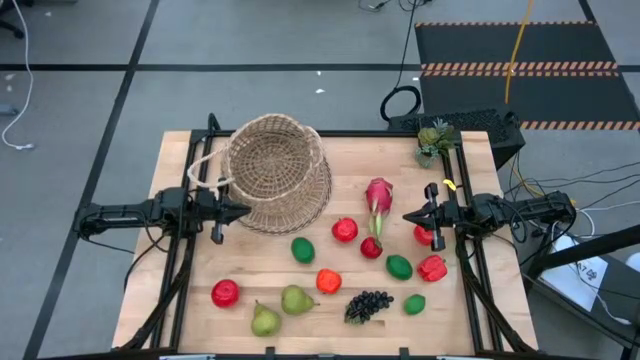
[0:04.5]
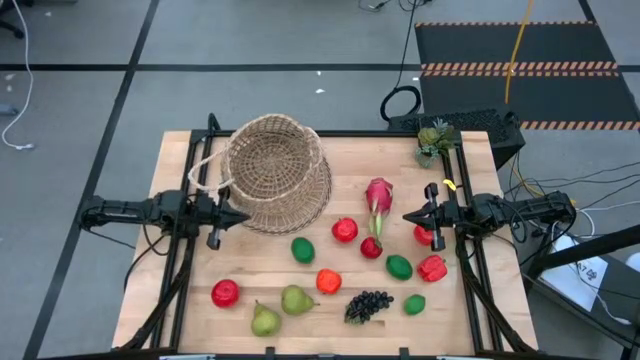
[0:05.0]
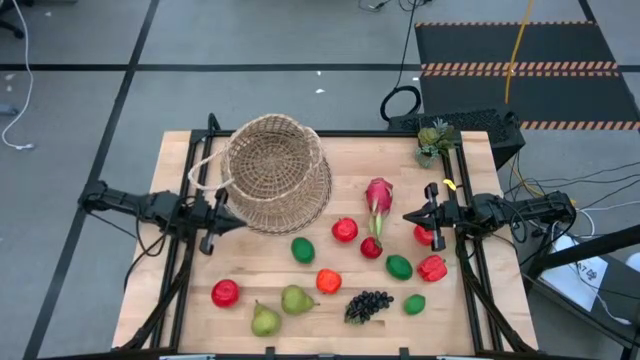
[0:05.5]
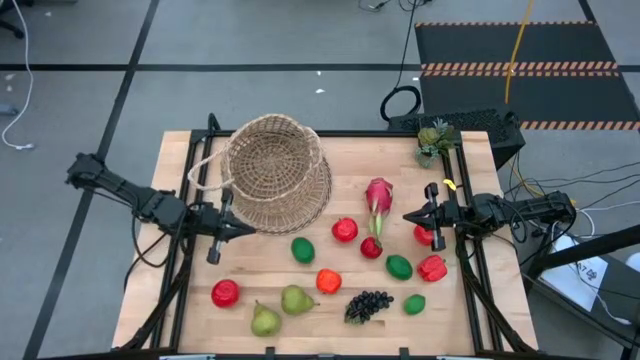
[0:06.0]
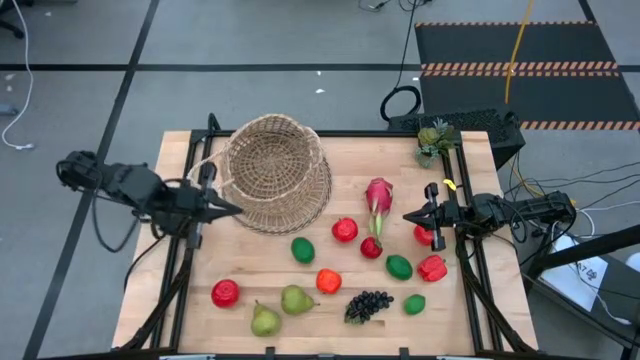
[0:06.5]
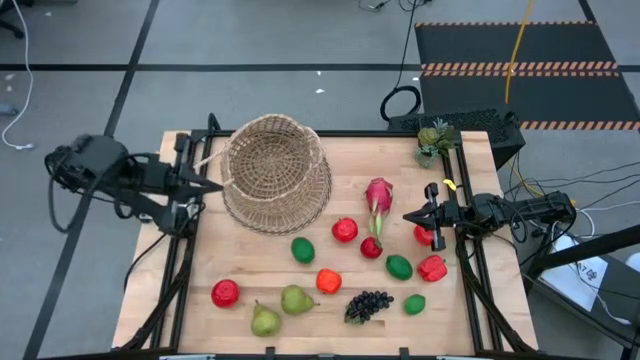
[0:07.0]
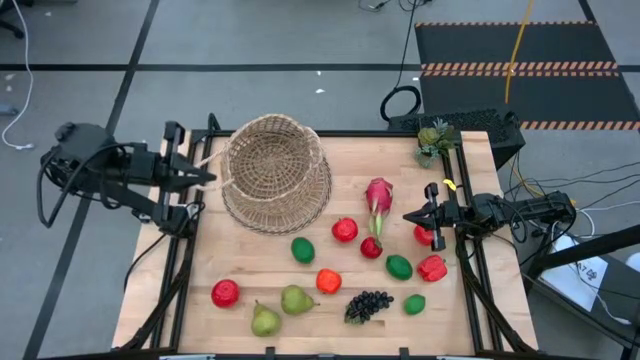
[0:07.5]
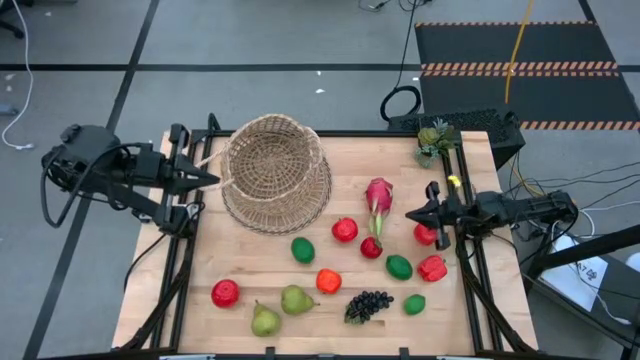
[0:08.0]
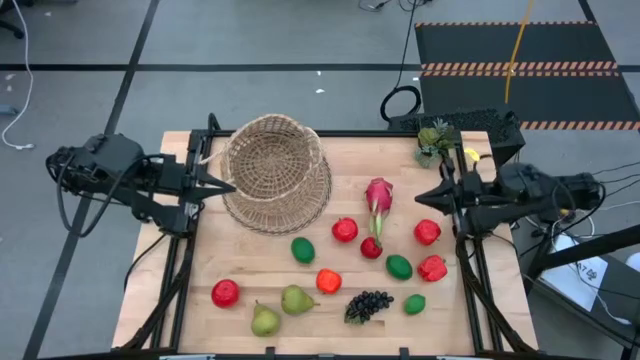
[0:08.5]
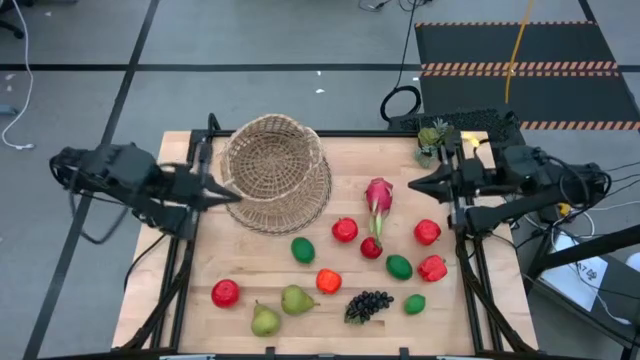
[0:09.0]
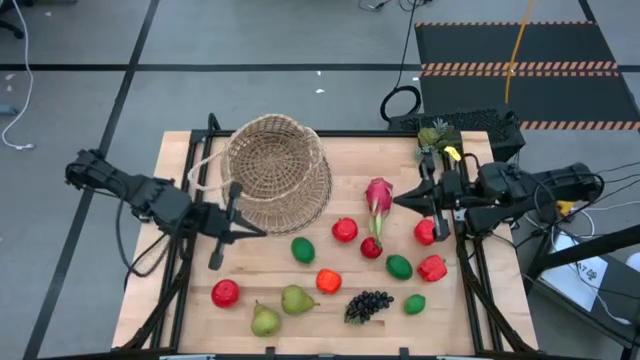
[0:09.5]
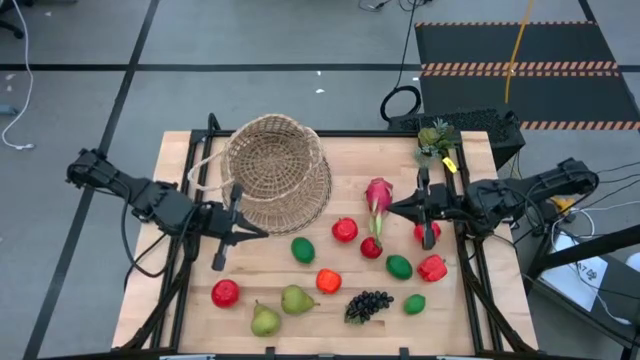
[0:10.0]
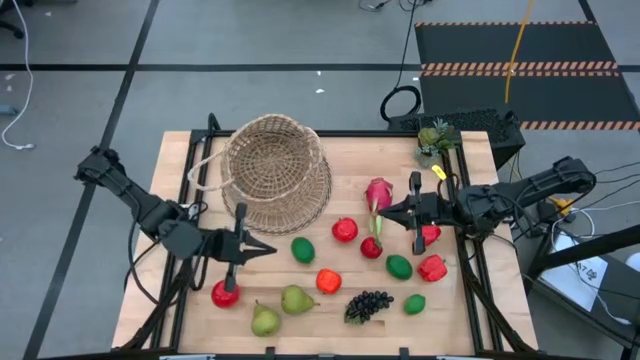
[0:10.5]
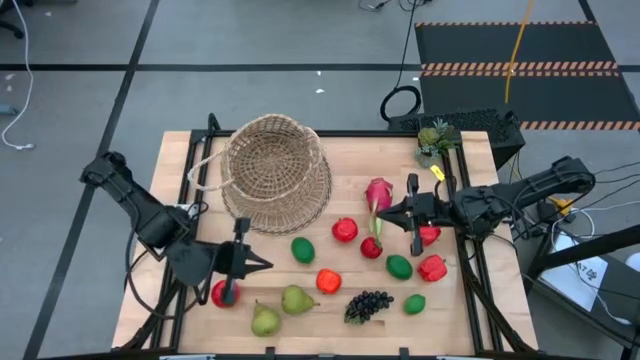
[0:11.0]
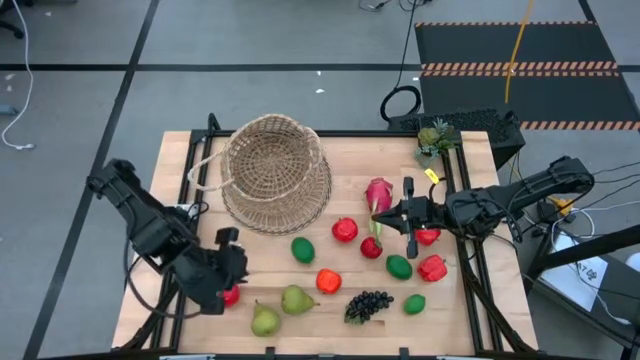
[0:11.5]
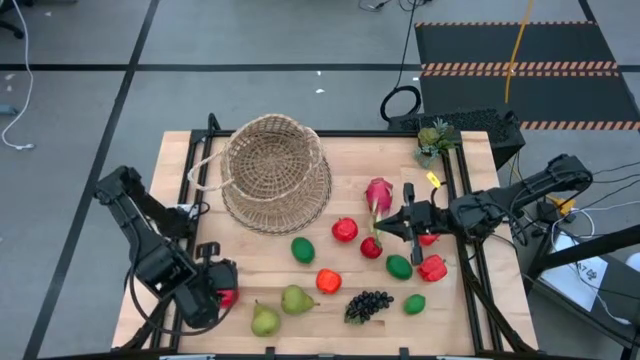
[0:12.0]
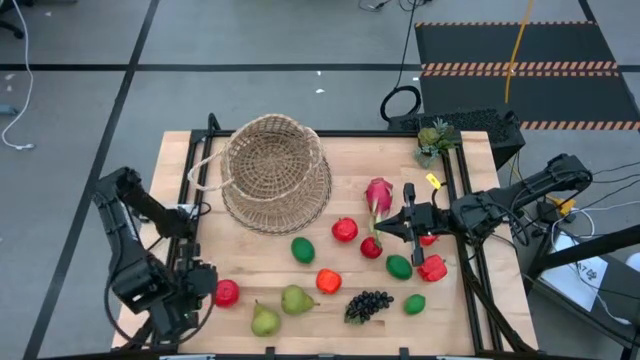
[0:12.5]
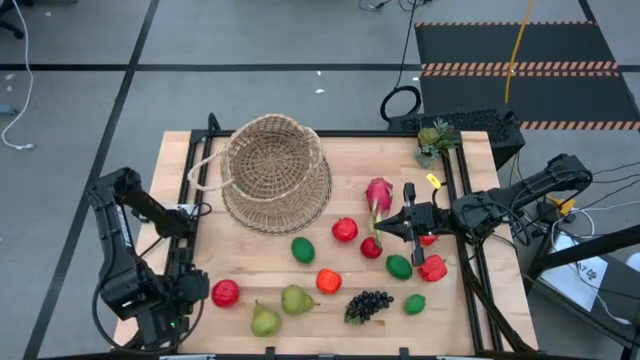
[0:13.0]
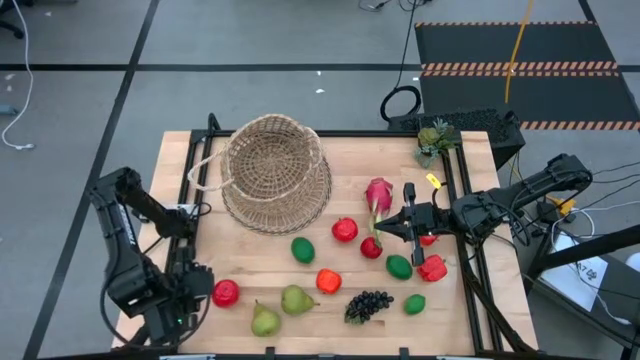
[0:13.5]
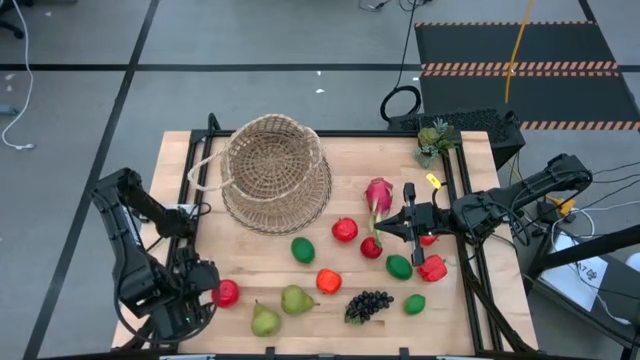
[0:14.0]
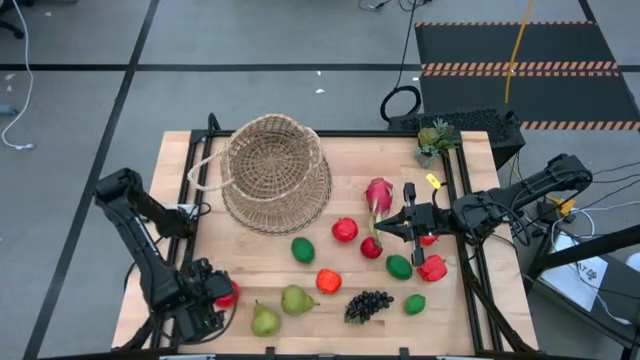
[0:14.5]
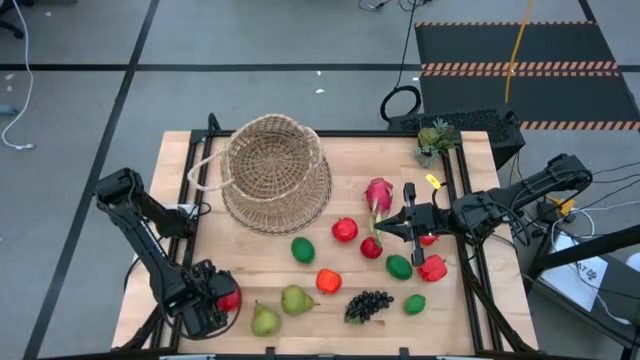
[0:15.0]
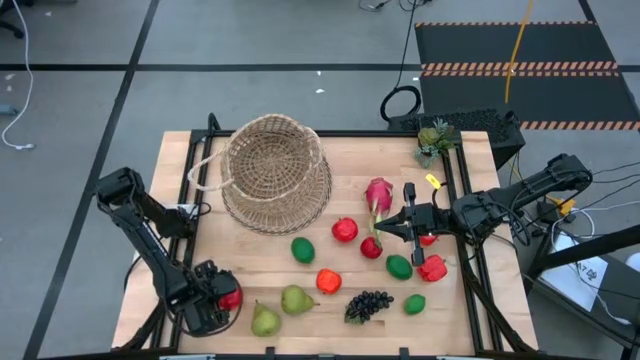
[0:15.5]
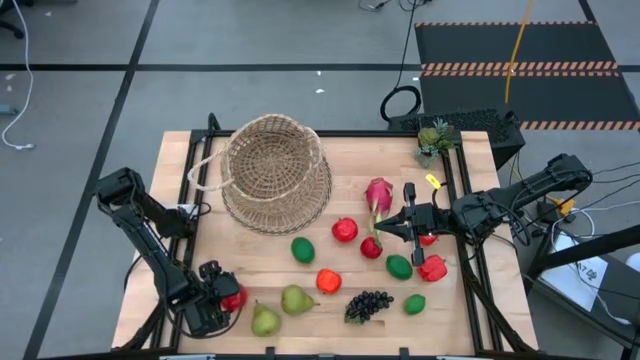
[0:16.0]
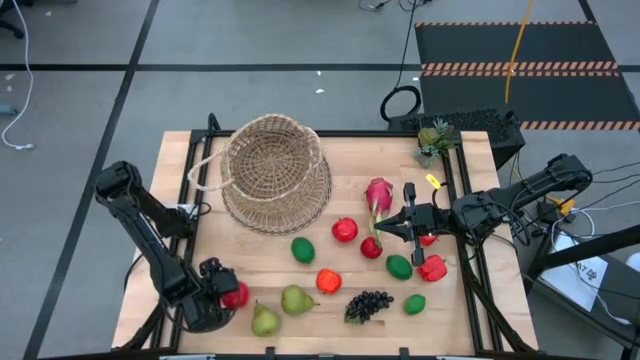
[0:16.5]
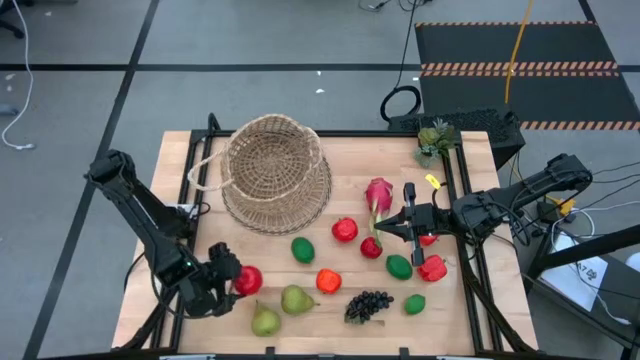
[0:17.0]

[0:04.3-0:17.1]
Task: Build produce basket
Put the apple into the basket
